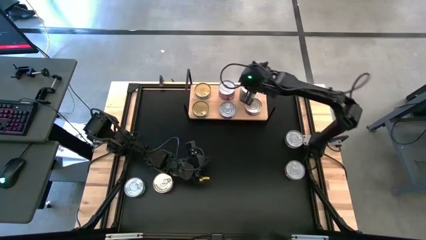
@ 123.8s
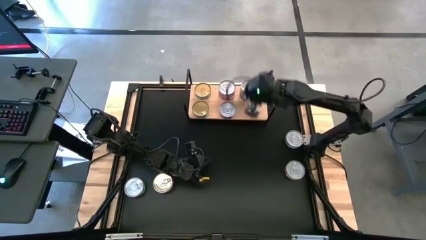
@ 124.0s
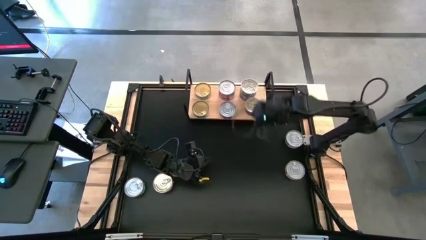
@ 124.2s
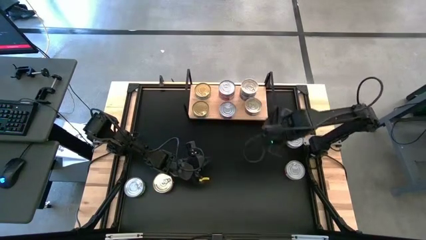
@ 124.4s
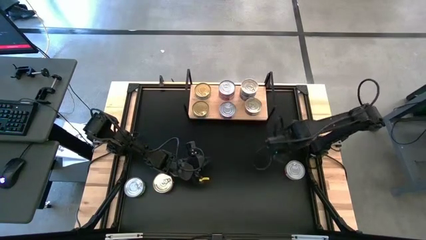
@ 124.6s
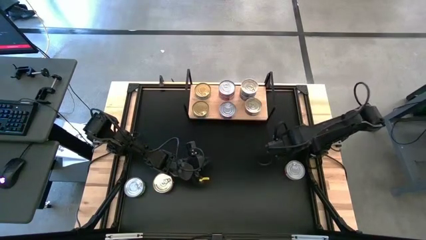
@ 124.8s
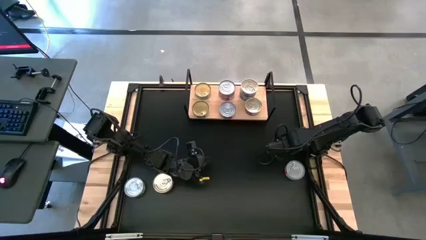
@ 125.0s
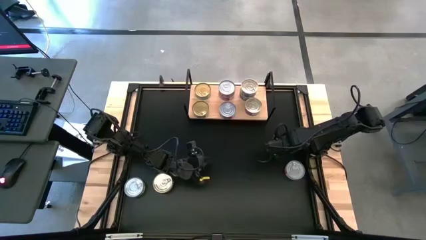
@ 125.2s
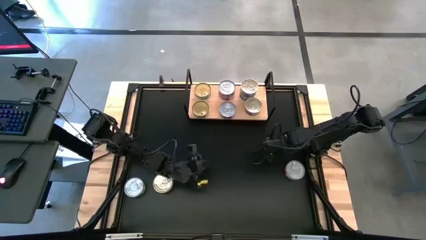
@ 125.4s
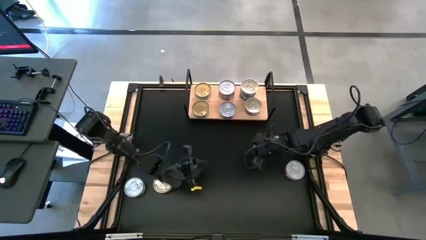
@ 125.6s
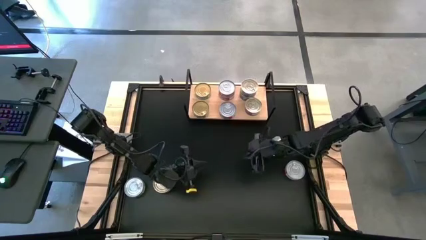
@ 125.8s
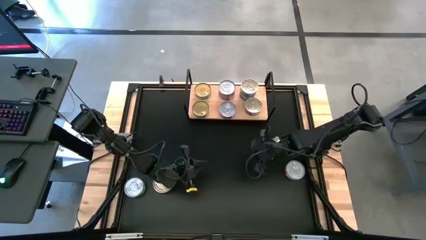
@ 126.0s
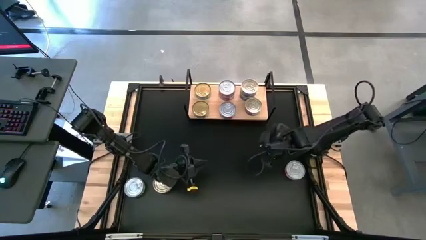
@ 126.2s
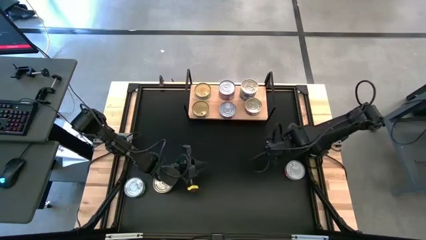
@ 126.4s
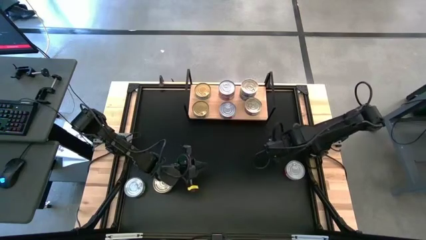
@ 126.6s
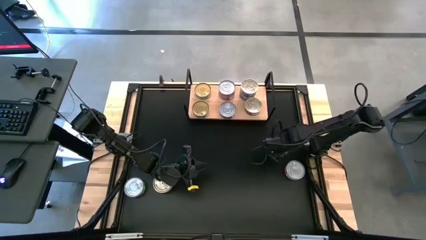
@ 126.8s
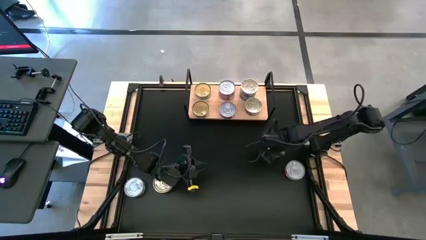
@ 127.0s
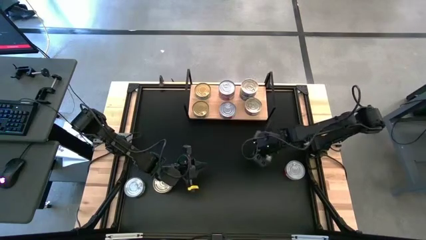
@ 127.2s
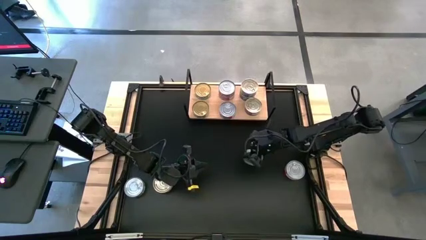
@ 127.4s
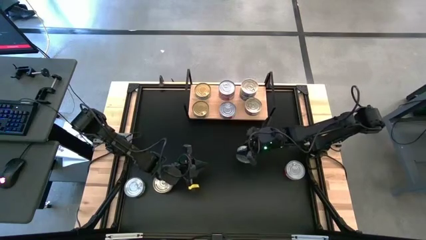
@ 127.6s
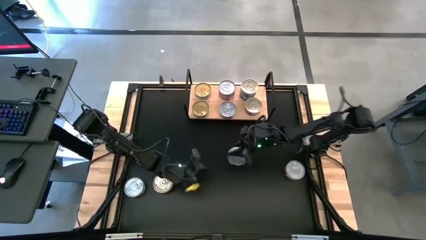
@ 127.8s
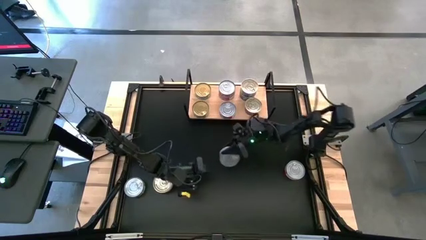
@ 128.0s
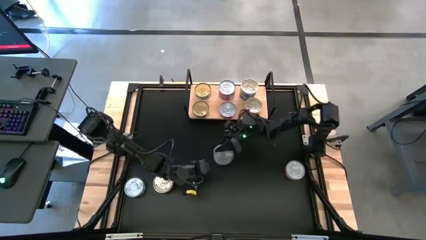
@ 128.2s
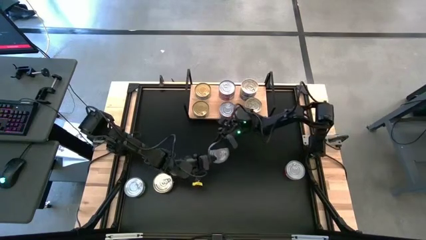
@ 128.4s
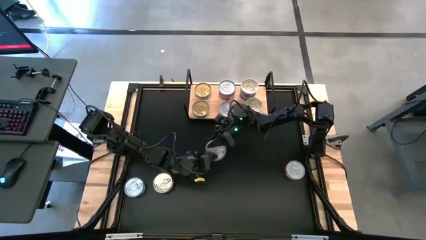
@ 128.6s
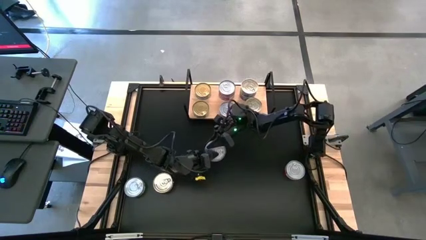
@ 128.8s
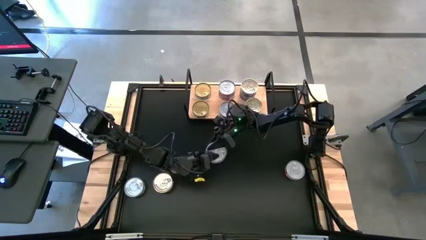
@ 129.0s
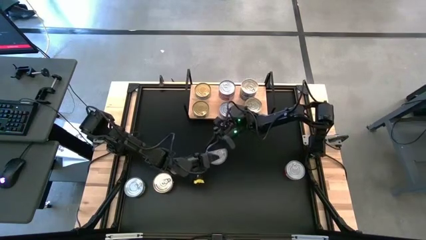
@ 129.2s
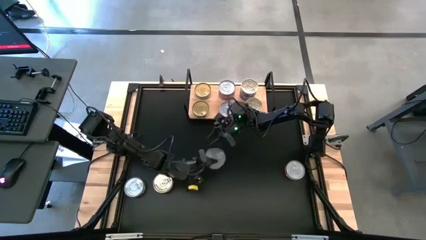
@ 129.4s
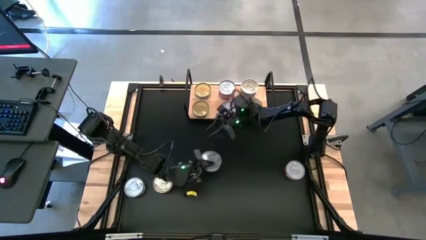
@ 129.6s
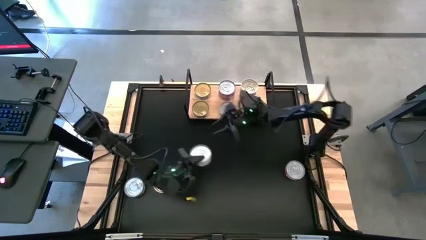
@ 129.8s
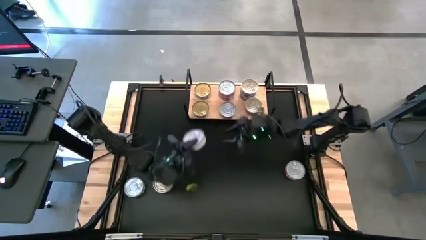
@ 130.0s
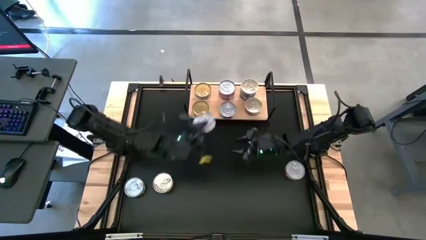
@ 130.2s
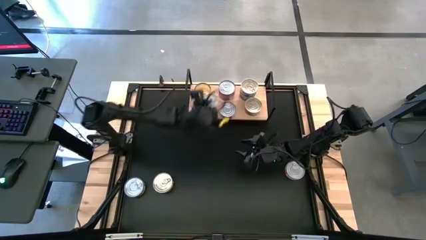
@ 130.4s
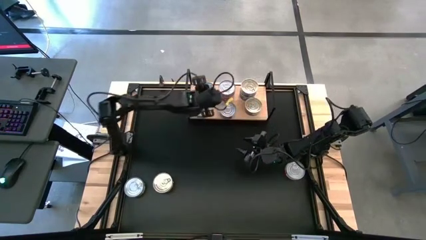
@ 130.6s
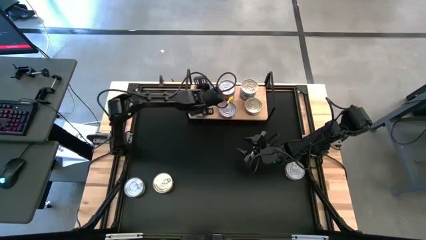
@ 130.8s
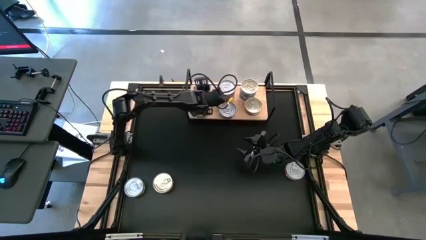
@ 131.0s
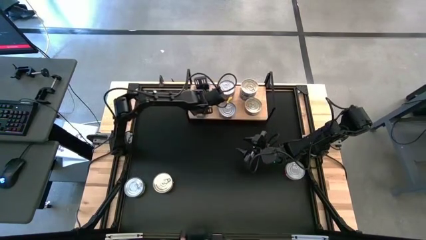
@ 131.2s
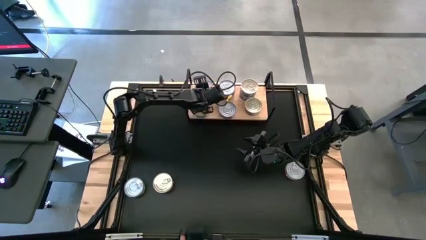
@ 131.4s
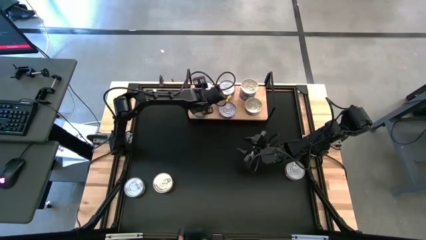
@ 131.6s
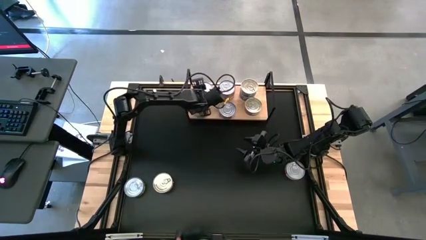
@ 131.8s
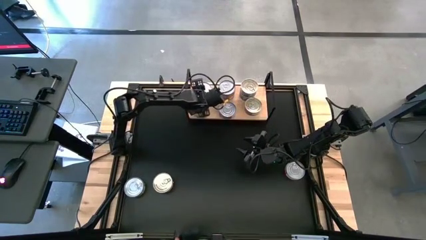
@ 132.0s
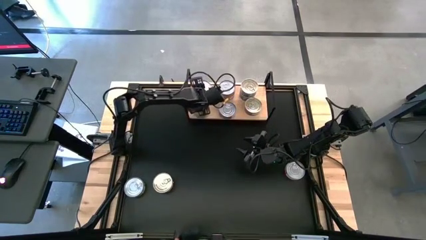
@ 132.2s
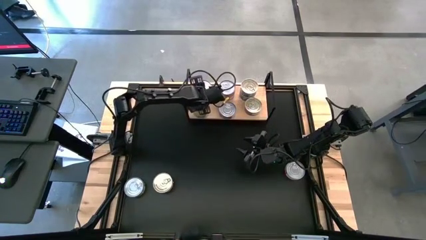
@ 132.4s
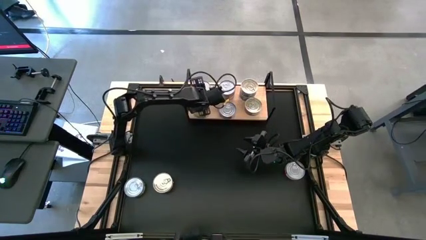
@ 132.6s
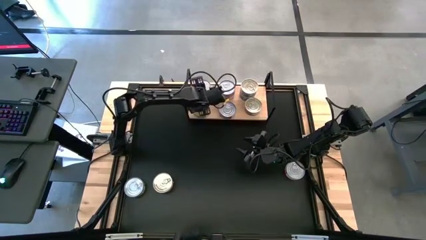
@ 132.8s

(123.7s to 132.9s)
Task: Stack canned seafood by type on shelf
Stack the green tuna can on top of the green tuna can on the shelf
